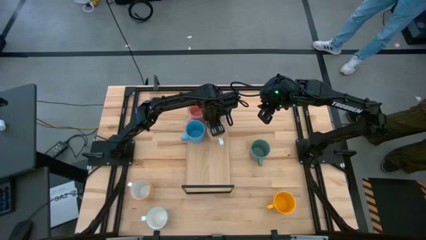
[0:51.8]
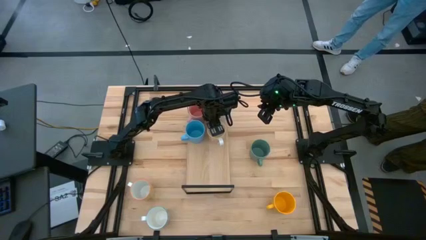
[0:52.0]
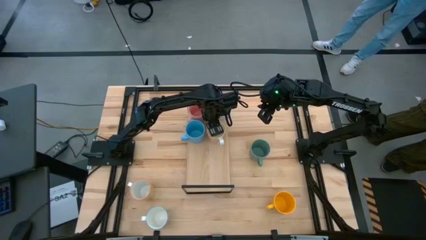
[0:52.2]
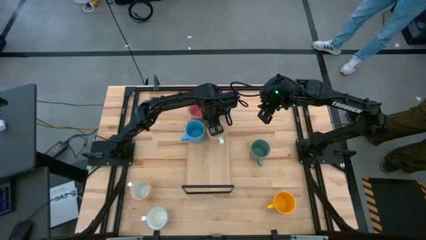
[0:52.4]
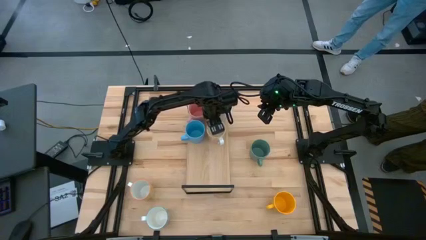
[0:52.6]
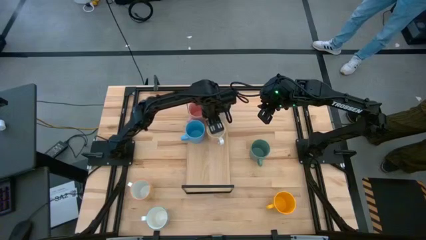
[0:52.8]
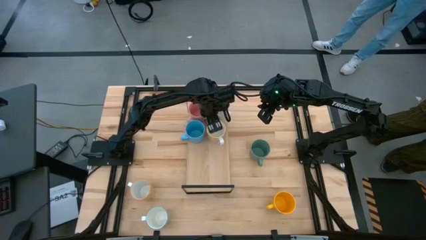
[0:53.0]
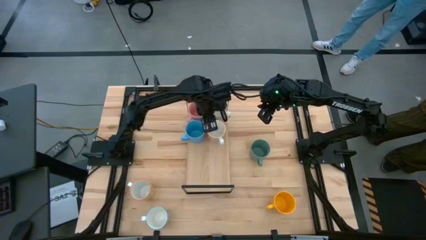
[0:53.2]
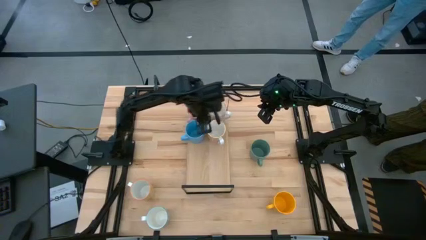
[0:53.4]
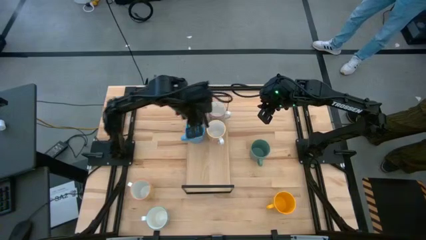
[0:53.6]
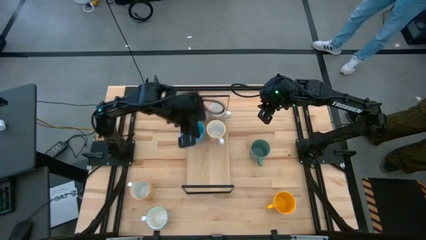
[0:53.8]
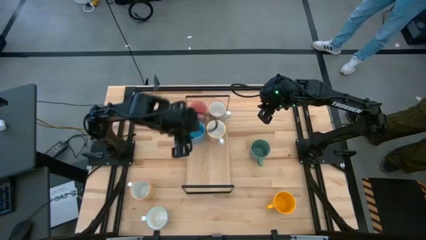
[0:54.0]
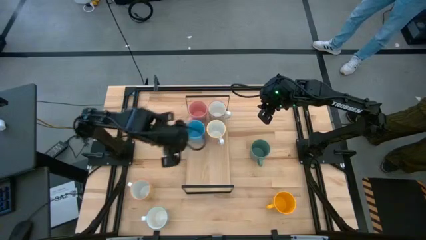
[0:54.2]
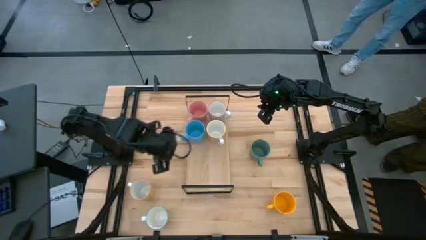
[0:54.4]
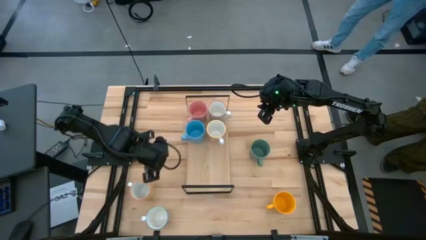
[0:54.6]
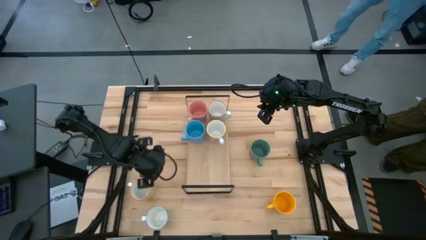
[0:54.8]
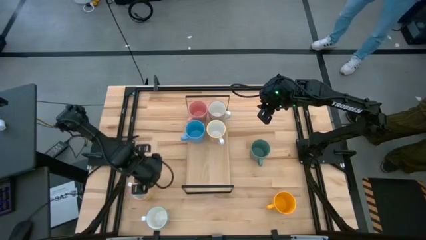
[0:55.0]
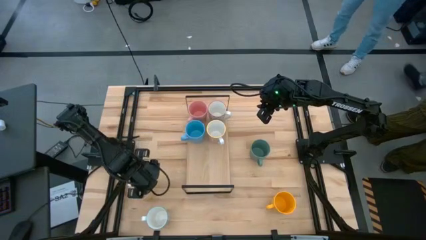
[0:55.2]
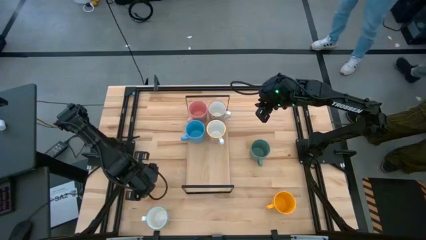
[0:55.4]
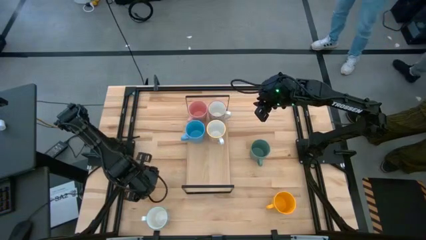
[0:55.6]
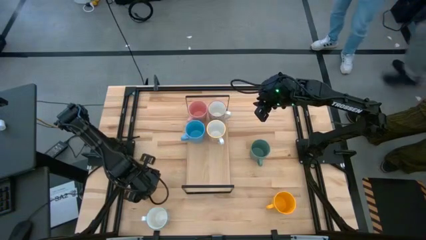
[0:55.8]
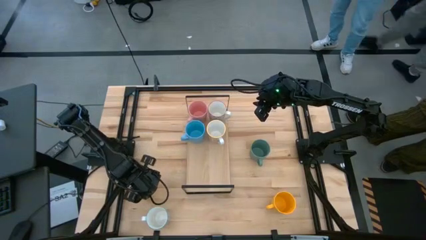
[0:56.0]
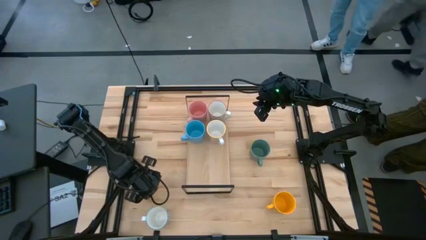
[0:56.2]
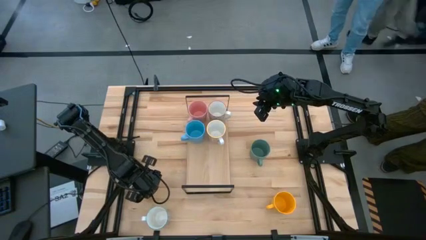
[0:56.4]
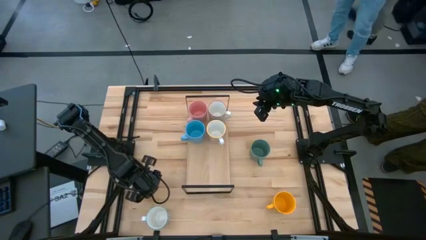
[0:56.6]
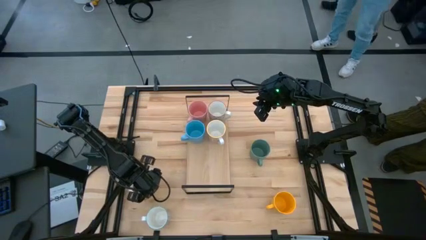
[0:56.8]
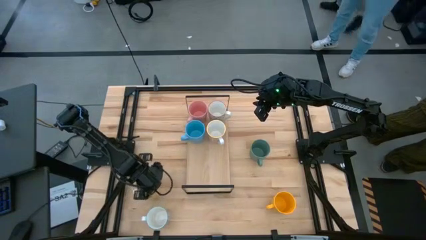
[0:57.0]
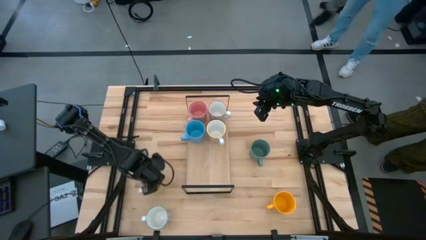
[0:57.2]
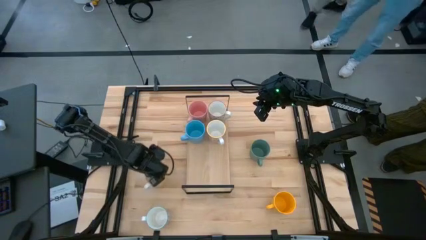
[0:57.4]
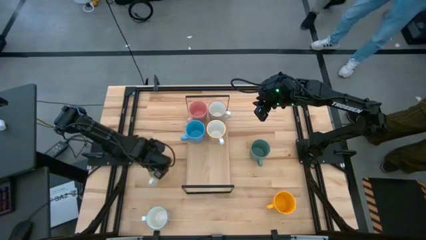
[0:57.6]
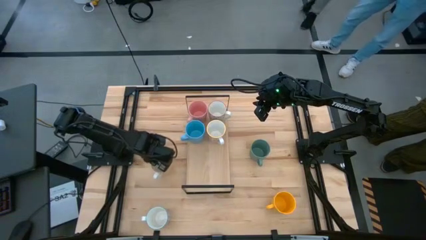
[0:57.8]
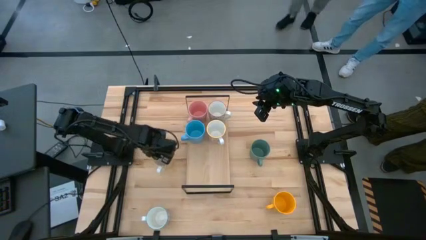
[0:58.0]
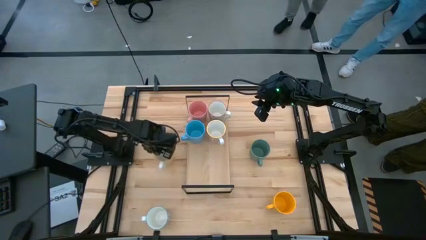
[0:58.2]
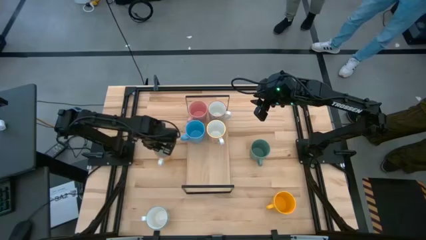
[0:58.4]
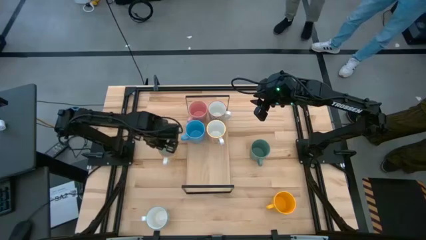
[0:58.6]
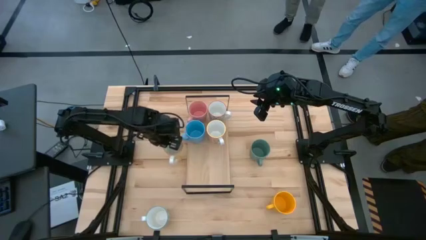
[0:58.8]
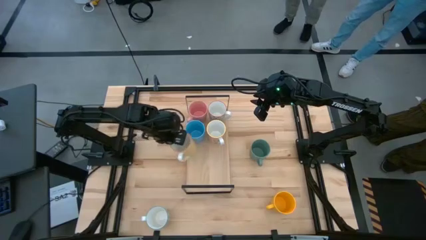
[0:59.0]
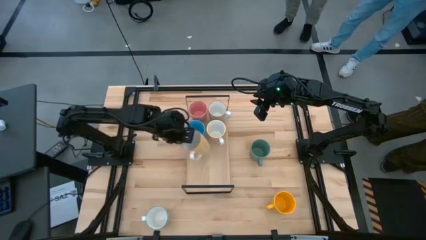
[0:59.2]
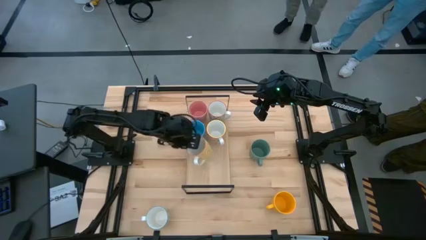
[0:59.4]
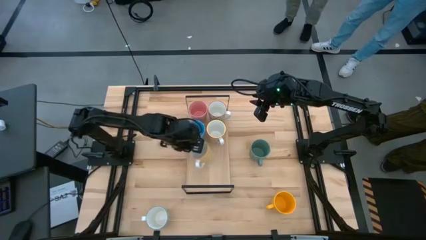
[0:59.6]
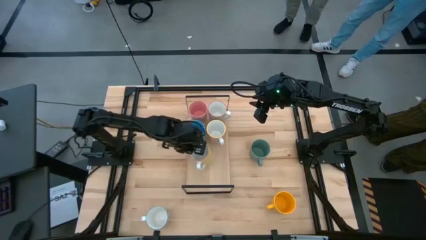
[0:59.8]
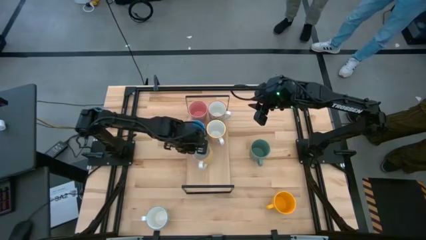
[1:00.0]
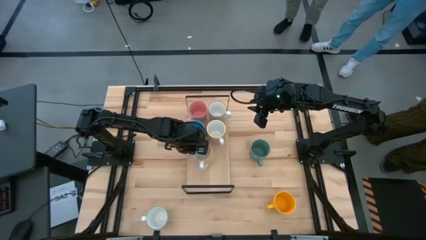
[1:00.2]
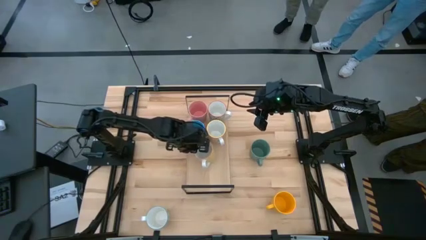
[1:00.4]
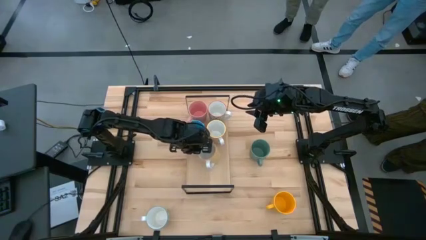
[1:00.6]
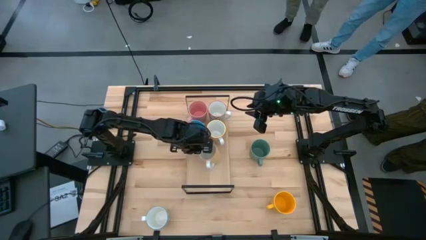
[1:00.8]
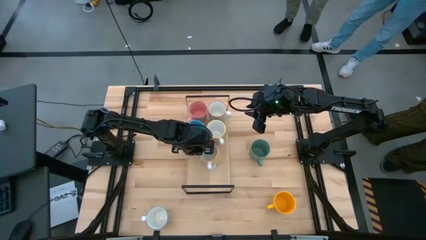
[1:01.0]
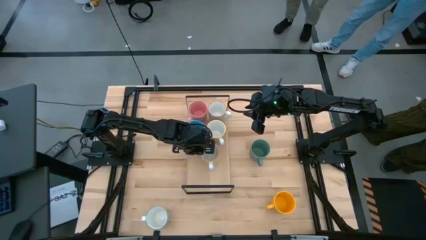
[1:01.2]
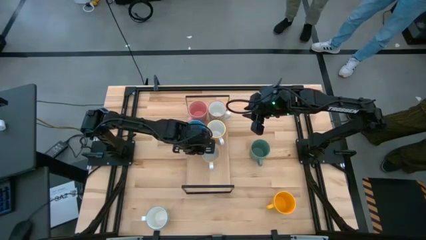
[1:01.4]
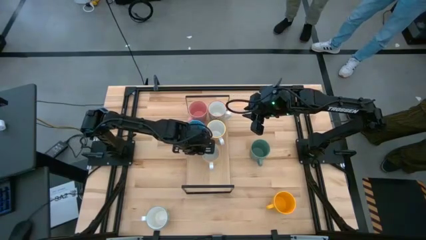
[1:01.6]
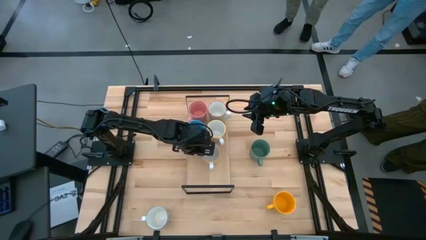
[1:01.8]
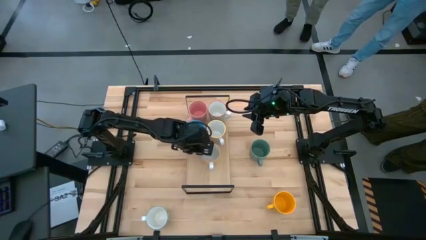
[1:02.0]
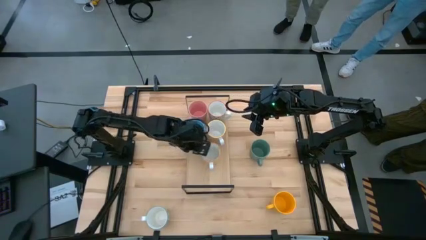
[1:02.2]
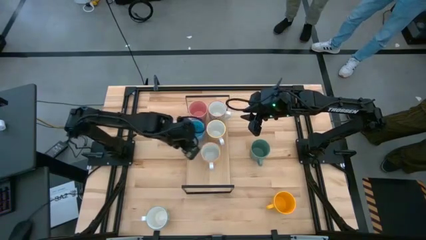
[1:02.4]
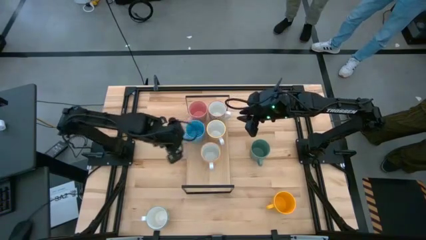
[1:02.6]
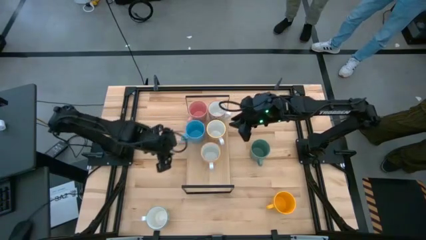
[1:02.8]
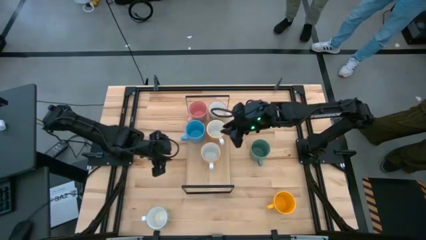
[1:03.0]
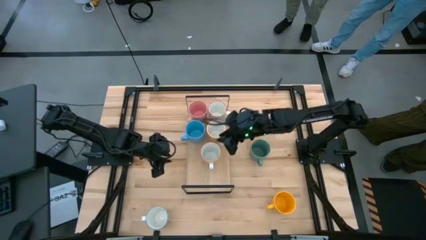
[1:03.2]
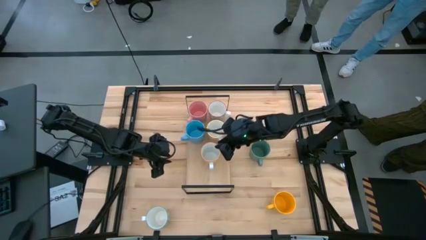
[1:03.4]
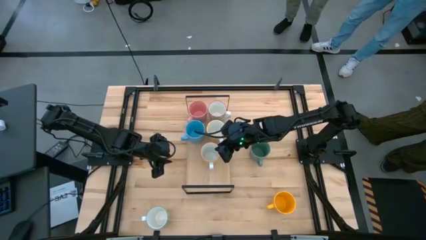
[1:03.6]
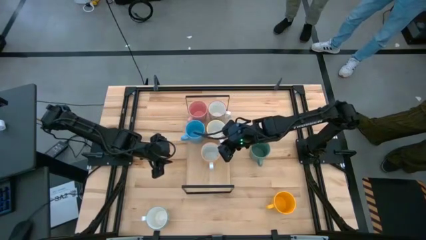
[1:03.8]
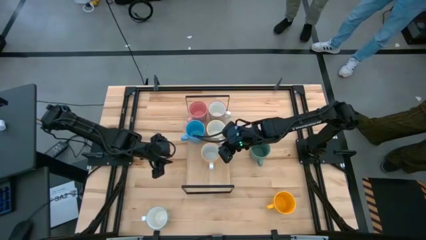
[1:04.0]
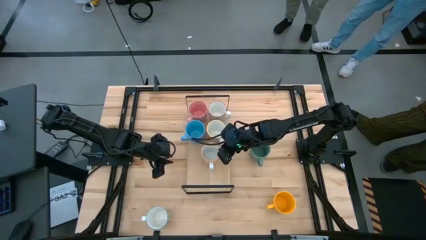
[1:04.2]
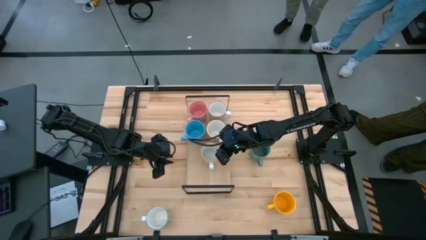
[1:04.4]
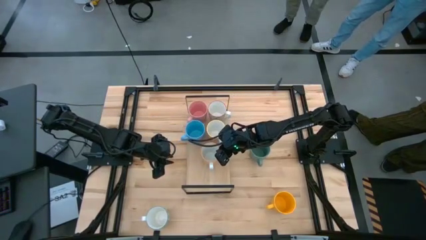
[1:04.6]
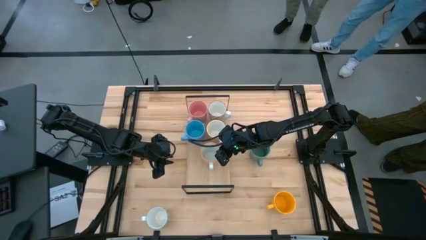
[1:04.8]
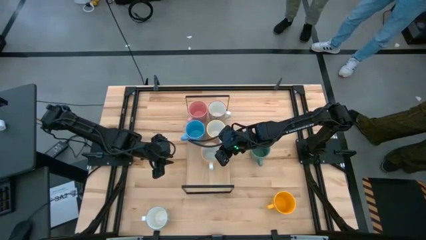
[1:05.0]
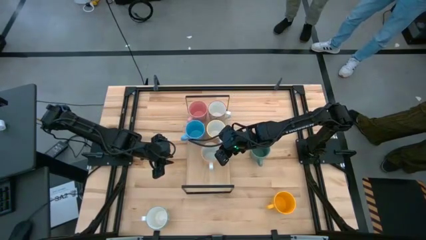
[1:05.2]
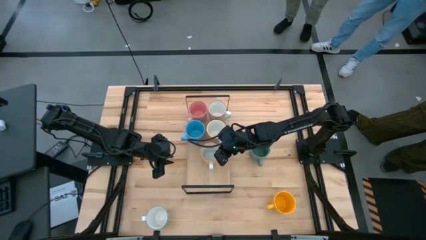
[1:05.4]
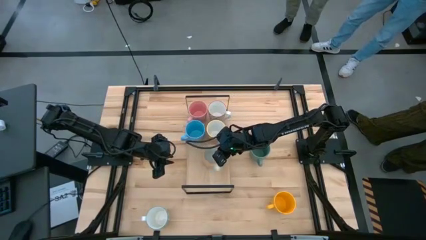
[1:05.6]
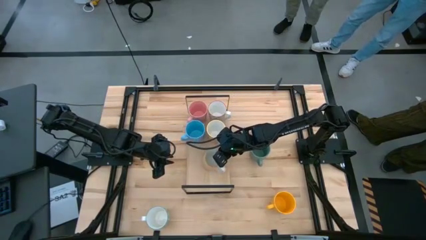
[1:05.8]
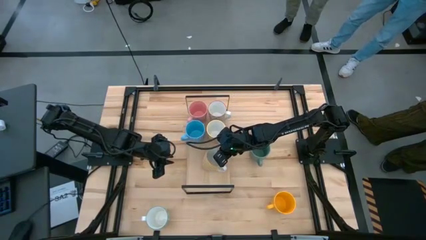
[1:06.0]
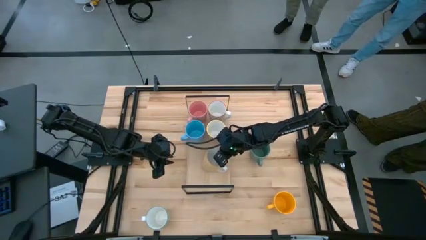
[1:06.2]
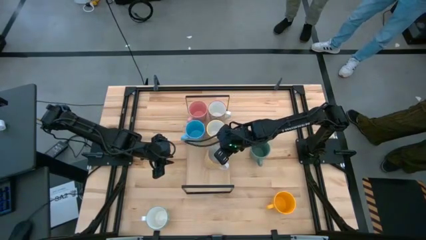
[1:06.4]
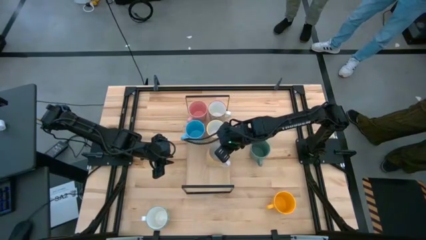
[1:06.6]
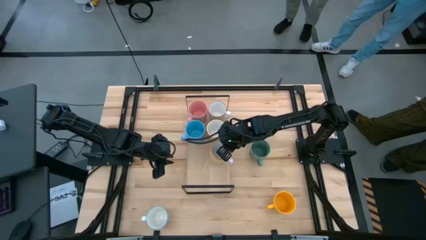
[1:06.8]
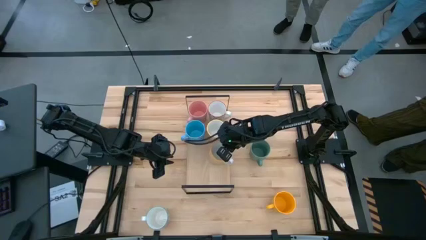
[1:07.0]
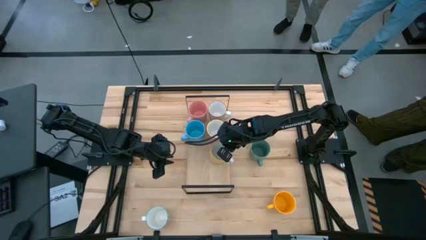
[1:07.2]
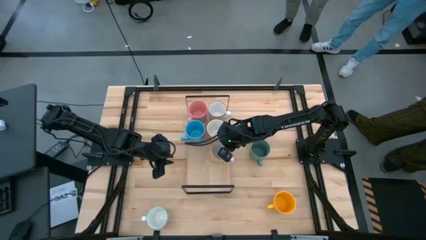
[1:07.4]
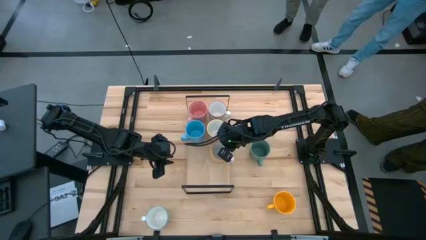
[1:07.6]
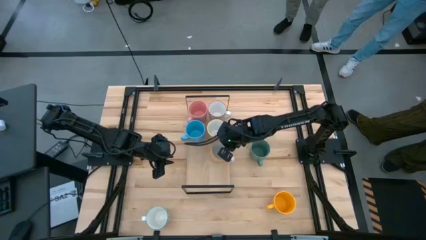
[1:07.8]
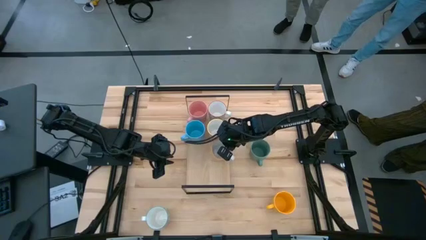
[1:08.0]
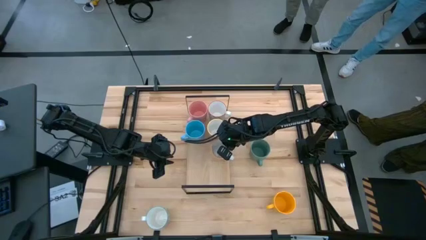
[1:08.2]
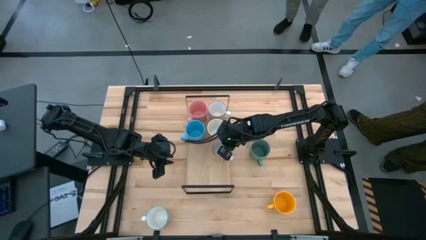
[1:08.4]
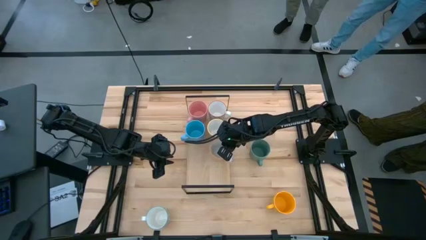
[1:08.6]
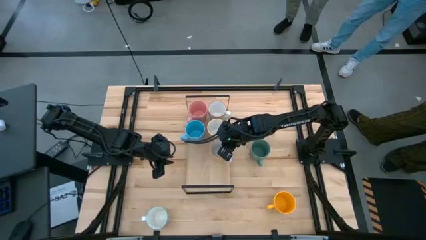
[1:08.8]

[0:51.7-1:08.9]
Task: Place coffee mugs
Put the yellow patterned mug on the shelf
